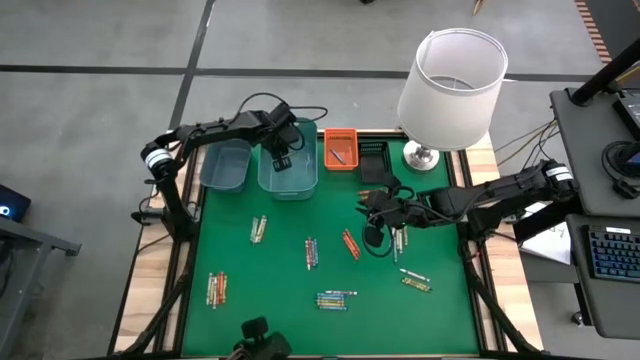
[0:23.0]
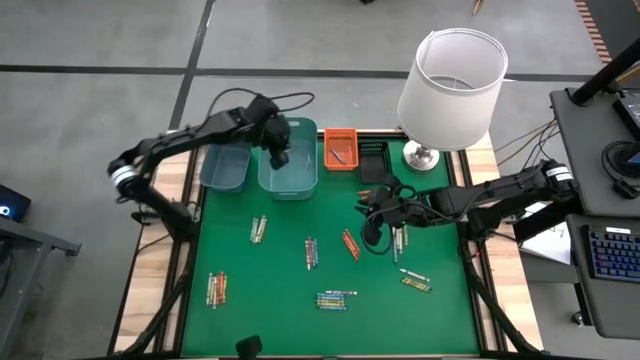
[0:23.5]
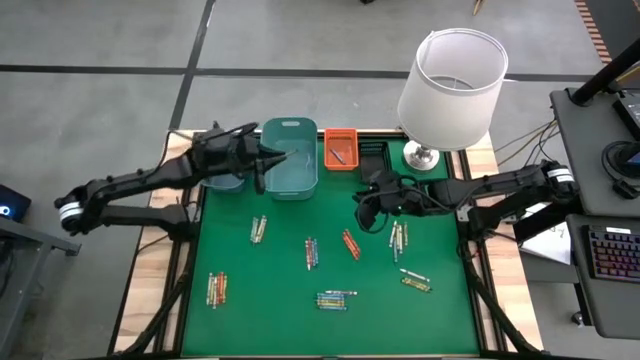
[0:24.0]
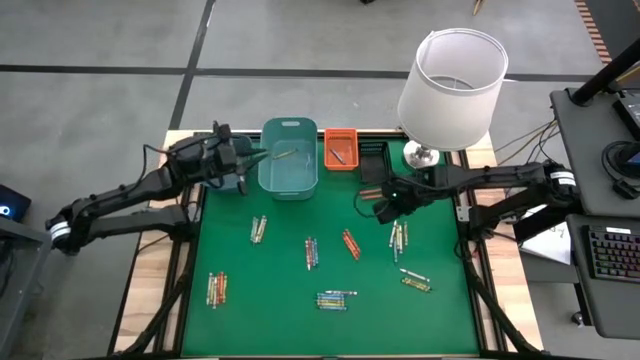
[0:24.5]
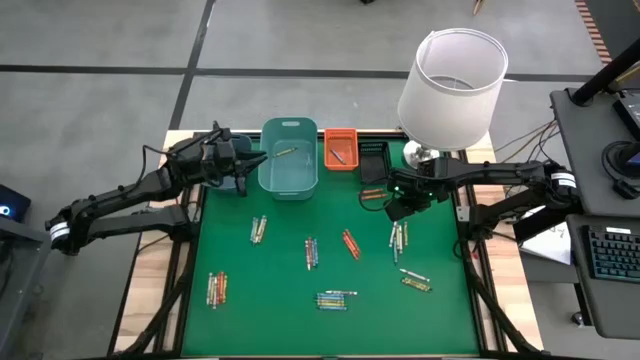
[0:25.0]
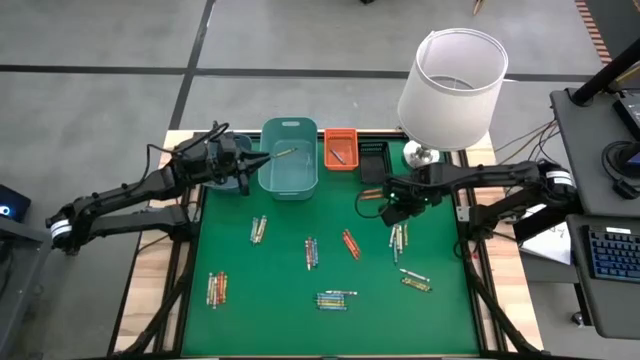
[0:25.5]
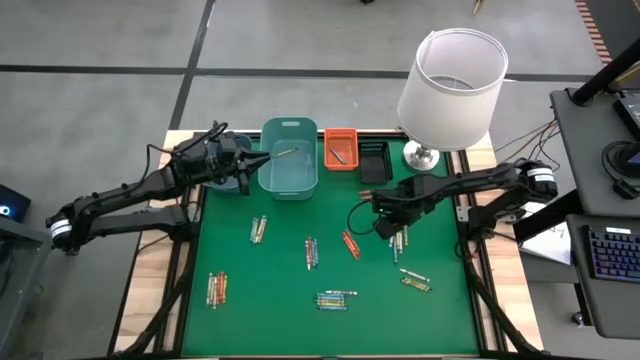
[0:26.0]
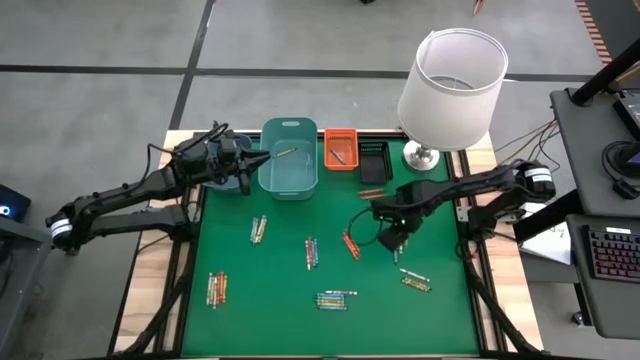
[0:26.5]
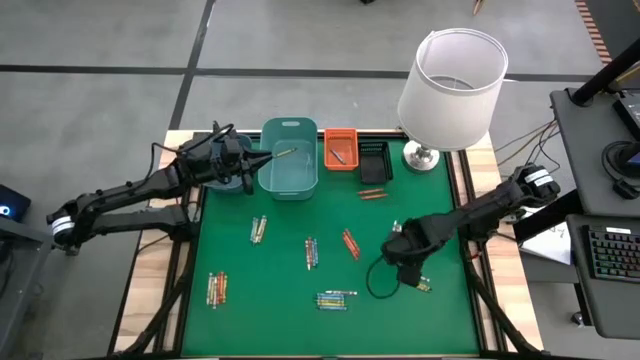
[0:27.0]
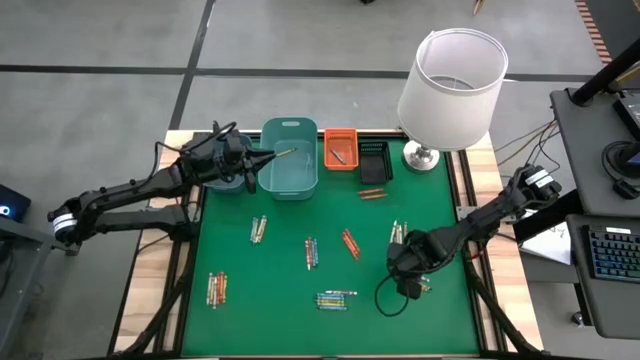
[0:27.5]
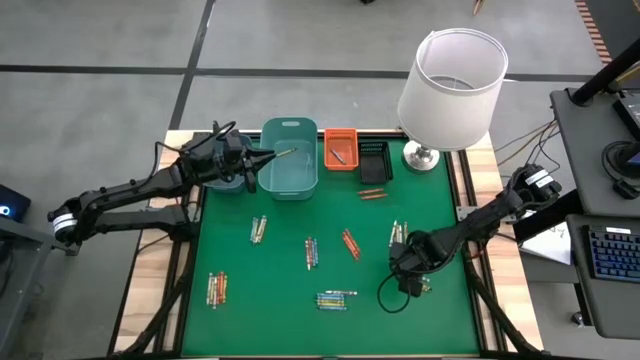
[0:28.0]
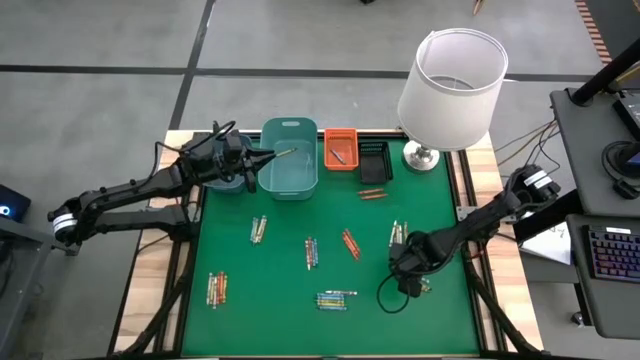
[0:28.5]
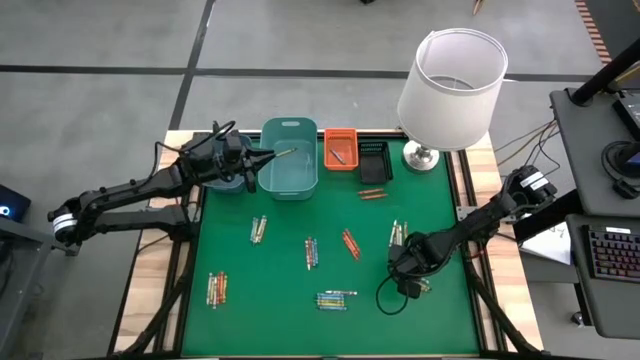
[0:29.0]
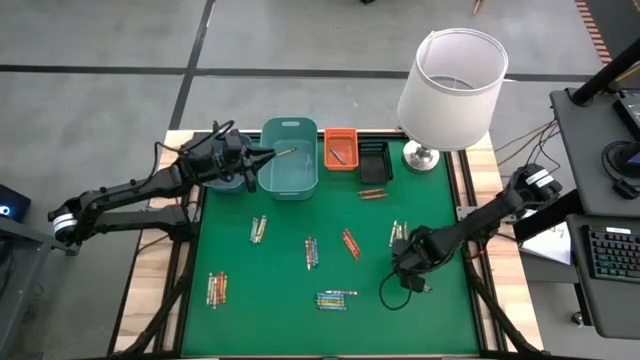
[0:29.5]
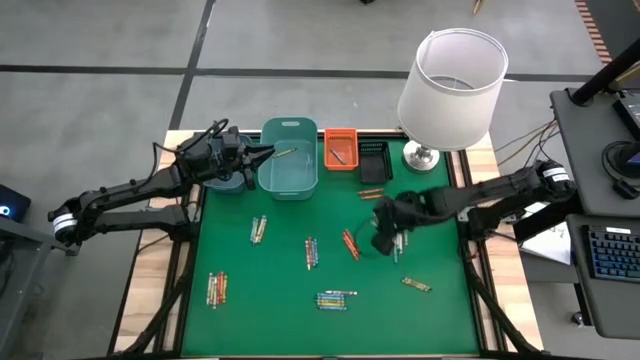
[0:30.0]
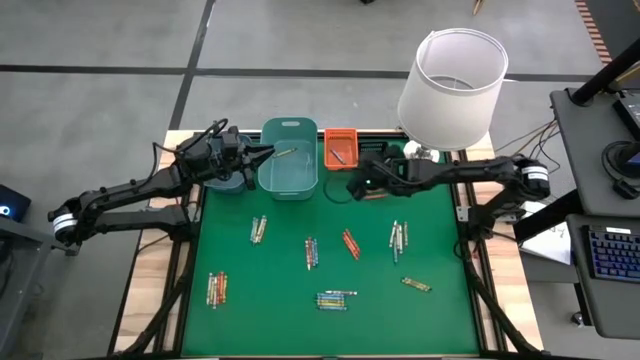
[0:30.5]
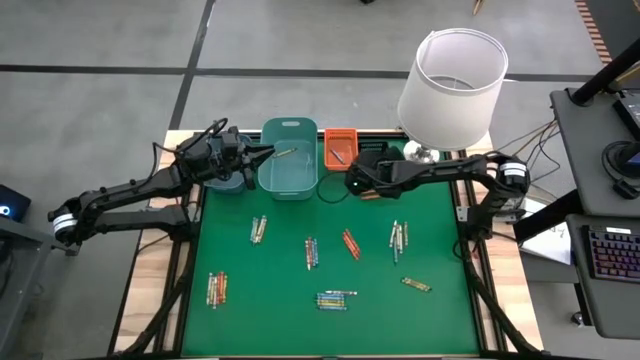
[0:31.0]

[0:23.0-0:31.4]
Task: Sort crayons
Put the white crayon into the black bin

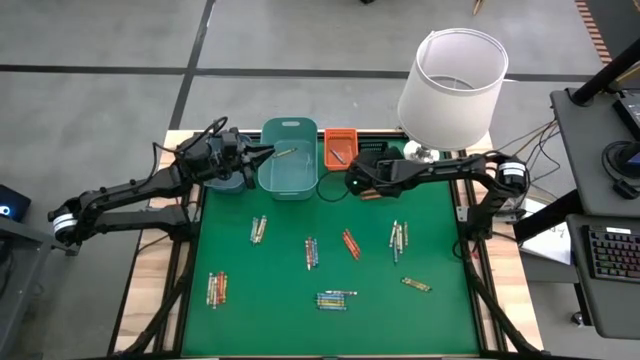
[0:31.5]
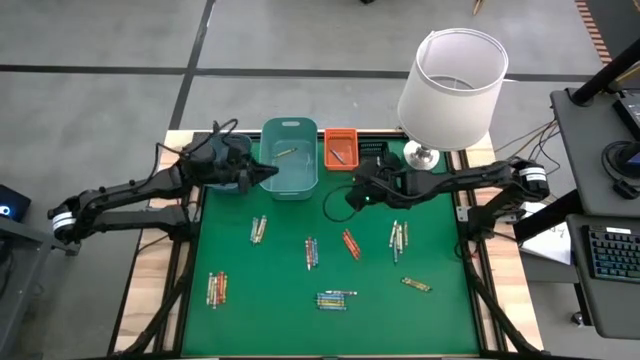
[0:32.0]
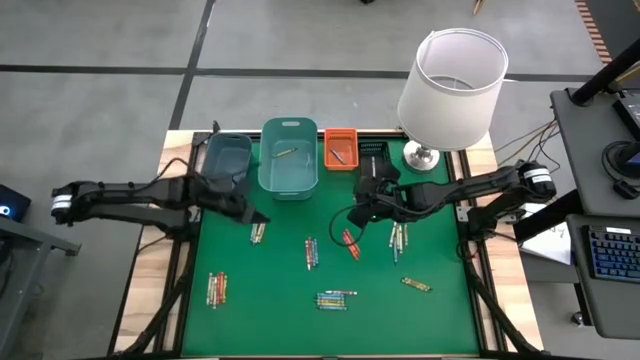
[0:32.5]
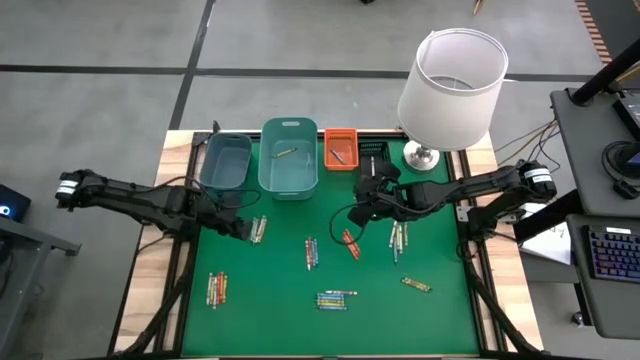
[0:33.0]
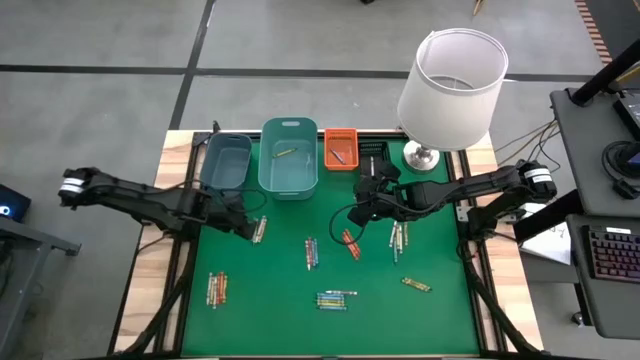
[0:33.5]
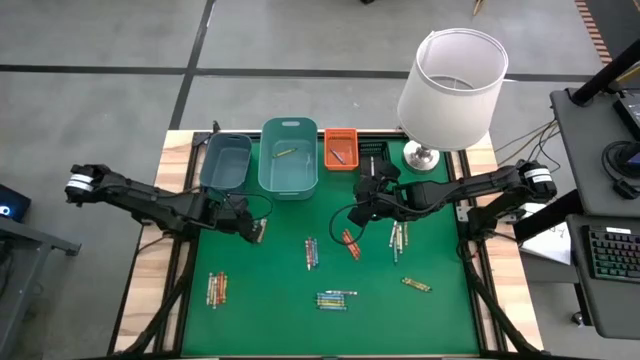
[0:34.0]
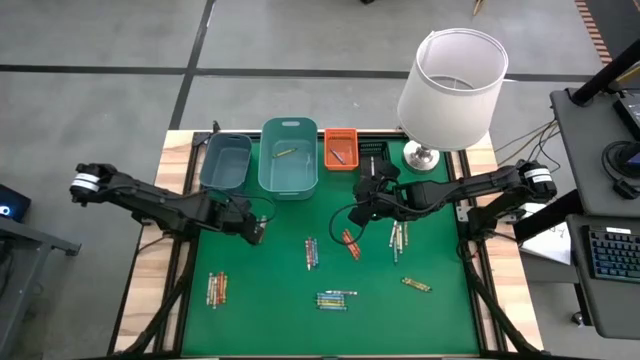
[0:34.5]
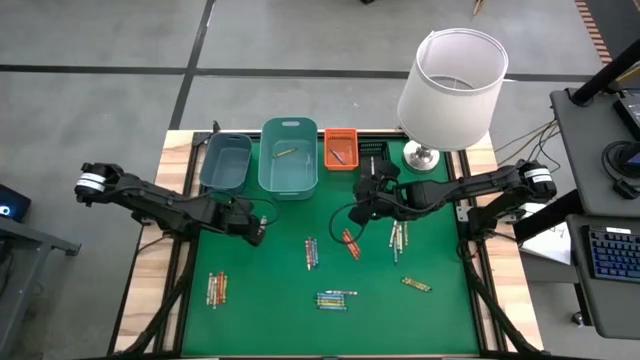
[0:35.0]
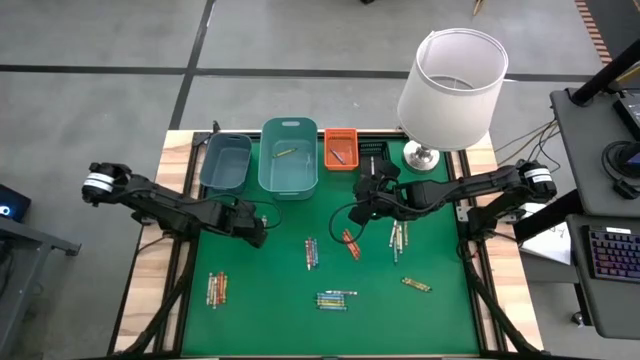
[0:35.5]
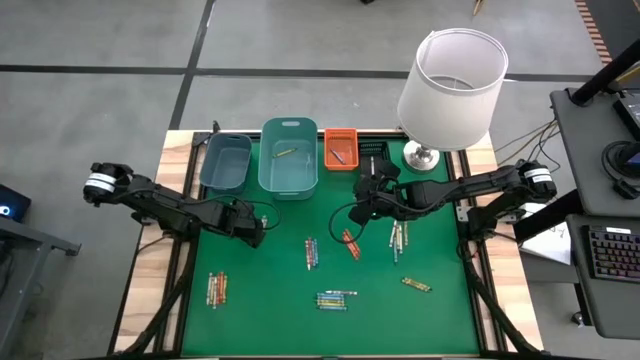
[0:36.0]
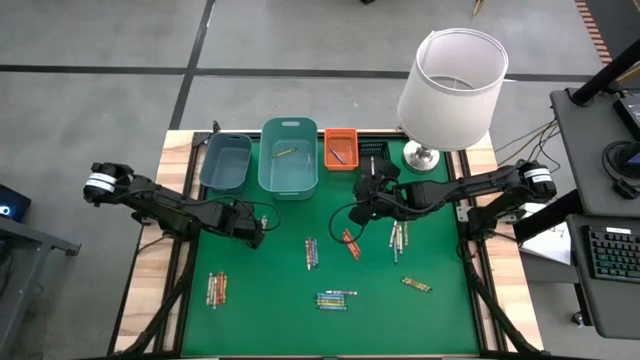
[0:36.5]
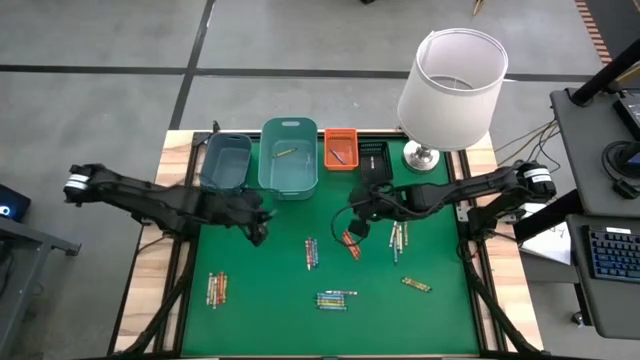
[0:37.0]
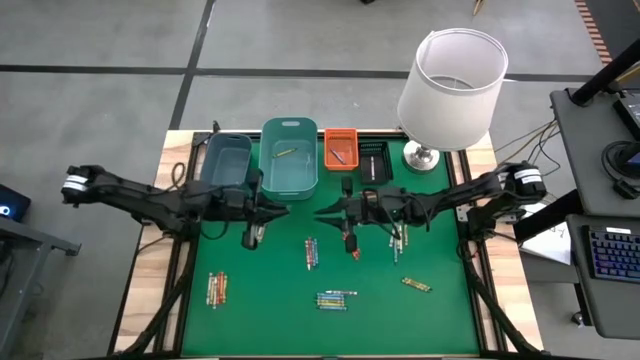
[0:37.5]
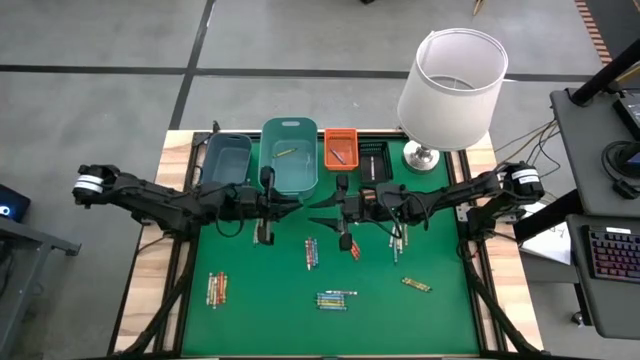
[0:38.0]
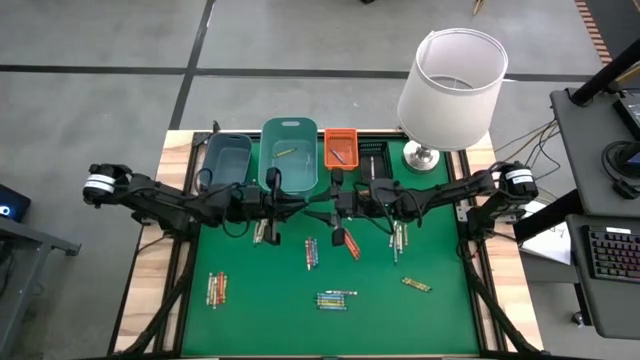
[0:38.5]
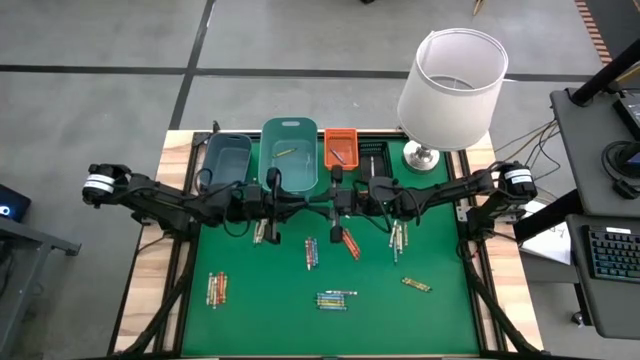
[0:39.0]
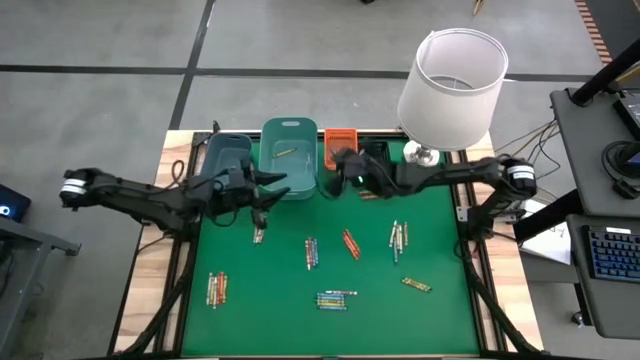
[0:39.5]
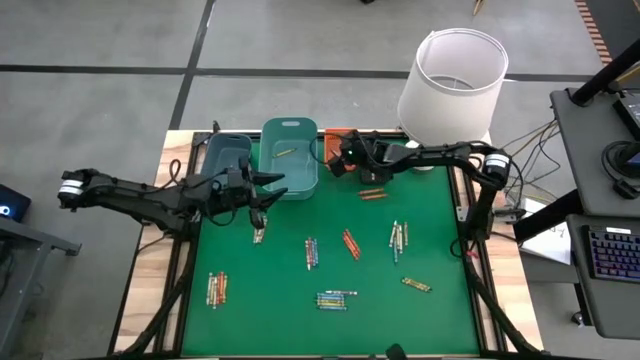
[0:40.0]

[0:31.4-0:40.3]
Put the blue crayon into the orange bin

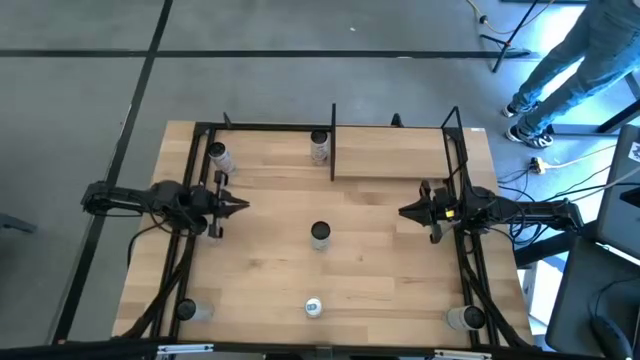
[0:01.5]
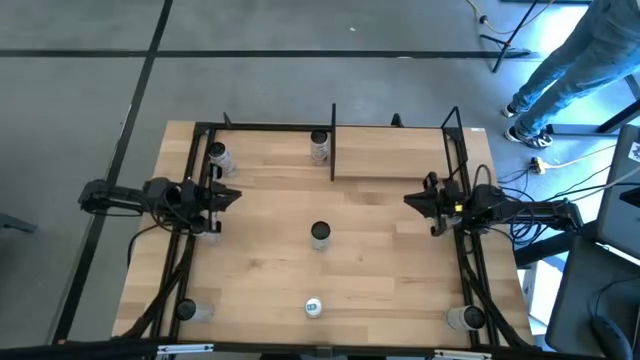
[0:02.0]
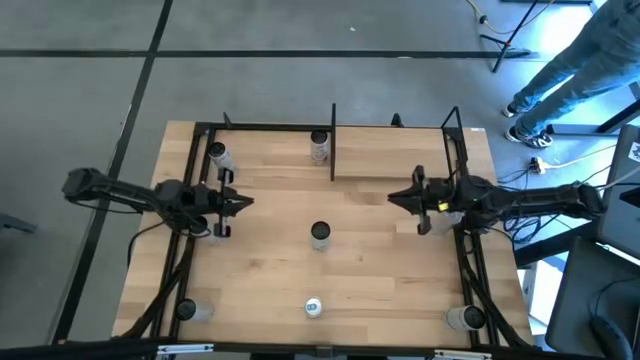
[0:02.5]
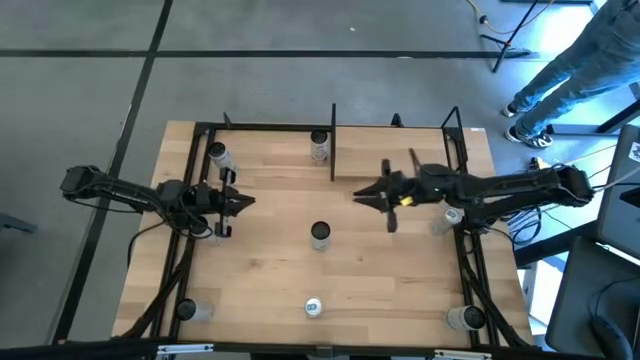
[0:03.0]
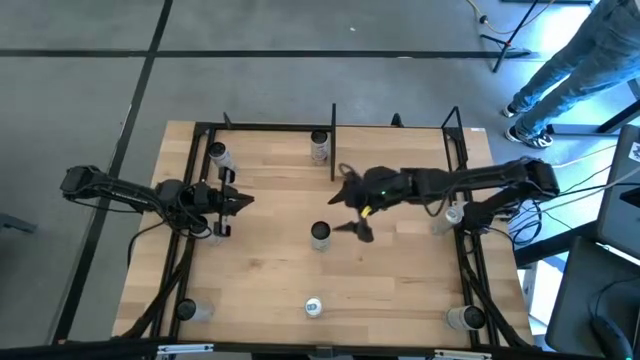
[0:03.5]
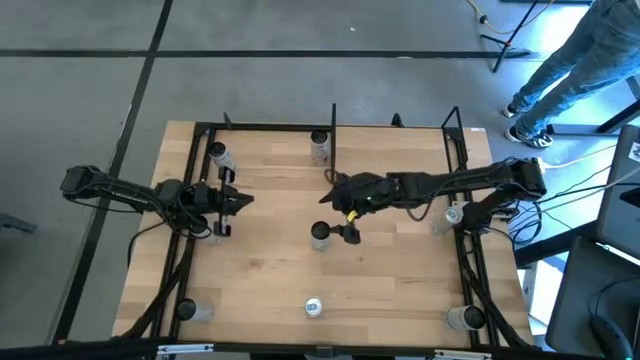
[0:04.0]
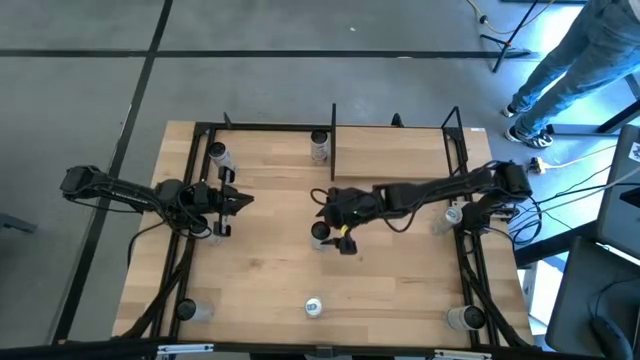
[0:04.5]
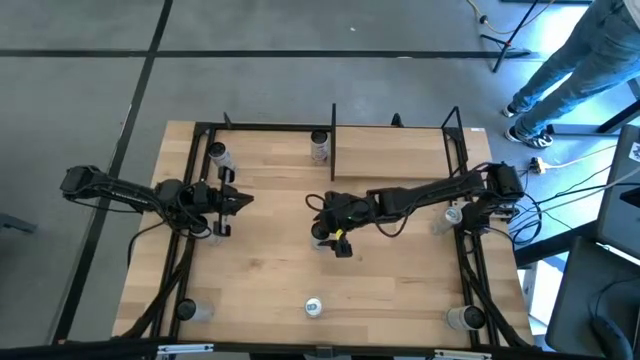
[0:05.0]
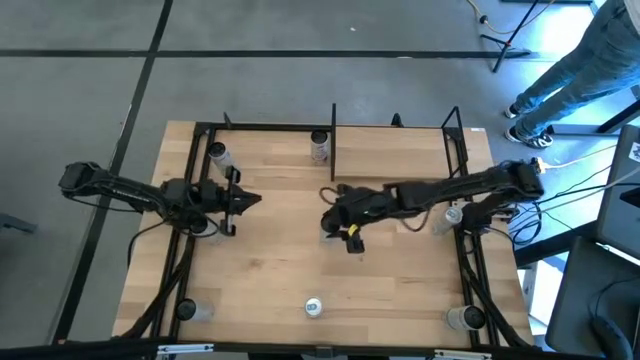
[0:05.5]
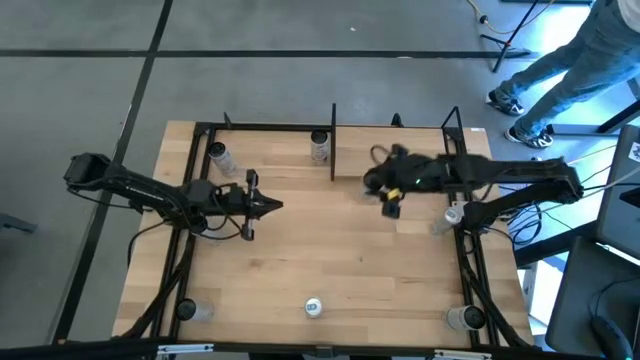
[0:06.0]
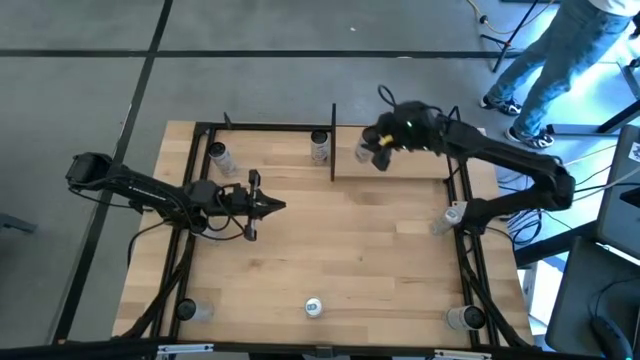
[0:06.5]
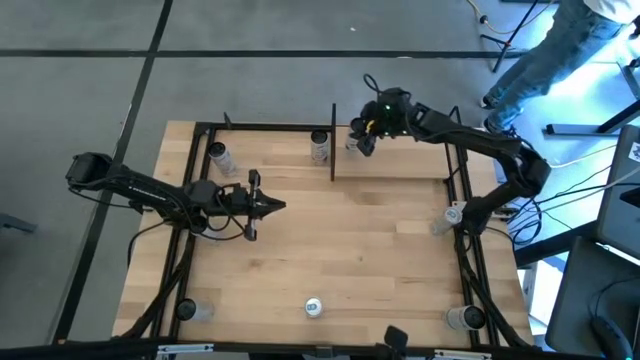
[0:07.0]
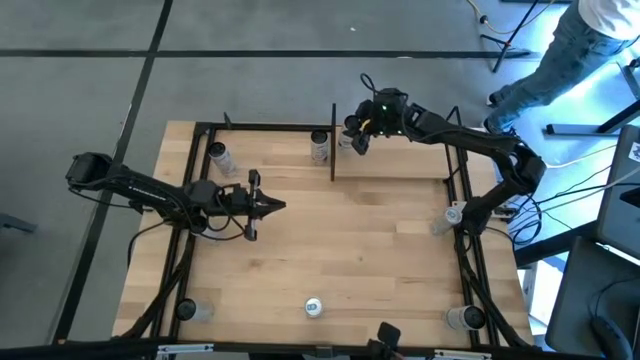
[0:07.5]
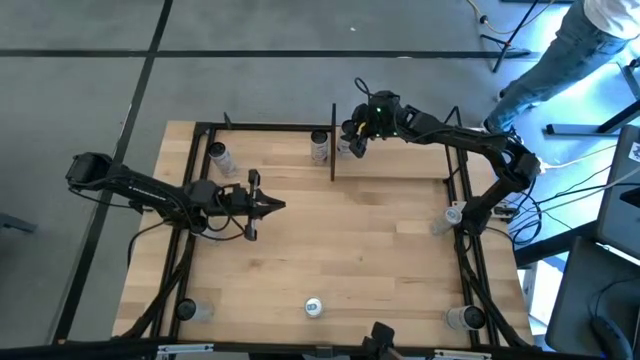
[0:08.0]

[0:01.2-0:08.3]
Task: Place canned beverage on shelf
Put the center black soda can on the shelf
